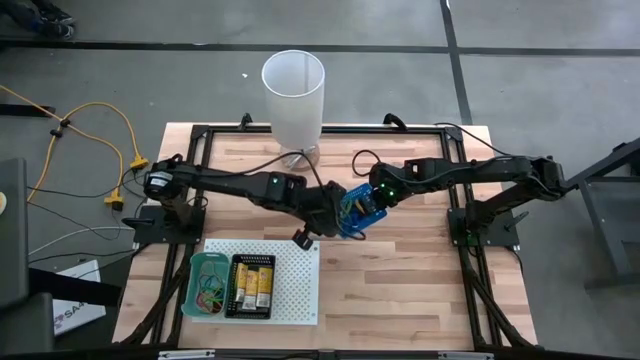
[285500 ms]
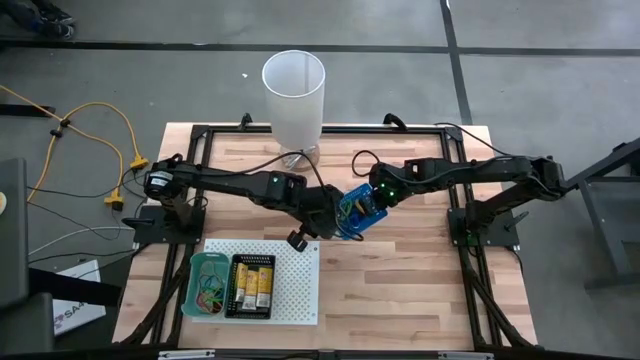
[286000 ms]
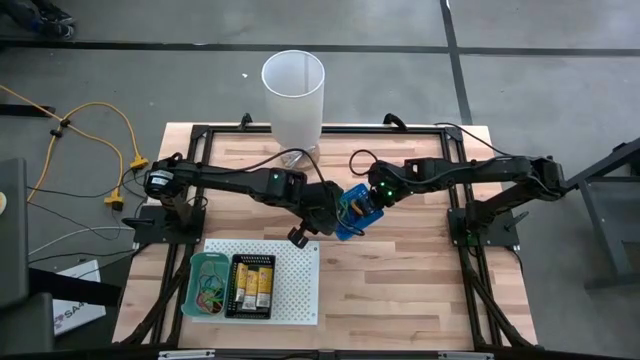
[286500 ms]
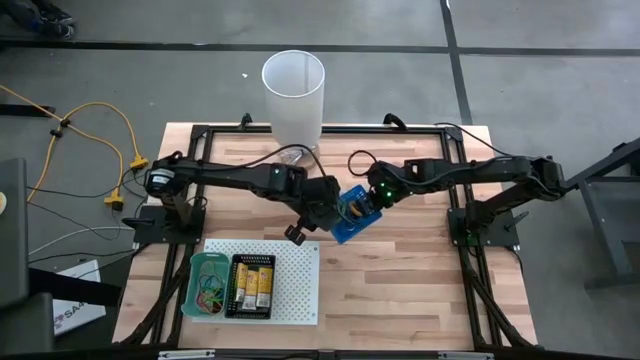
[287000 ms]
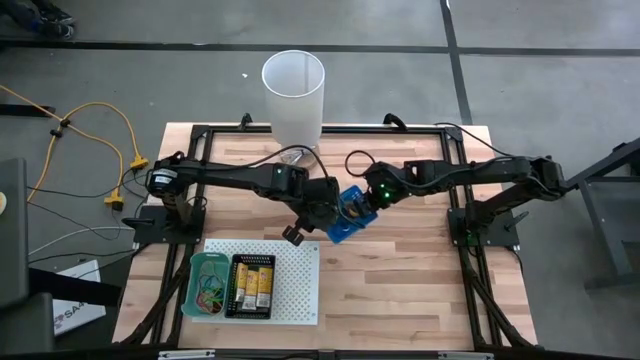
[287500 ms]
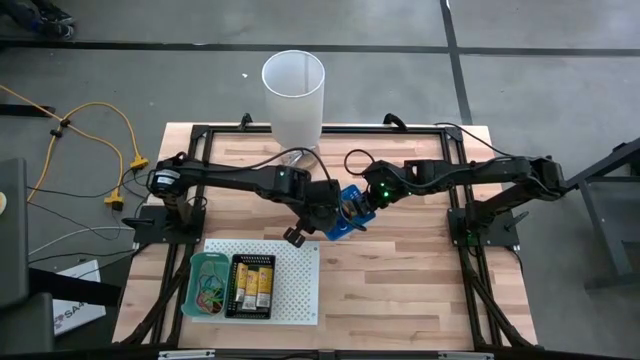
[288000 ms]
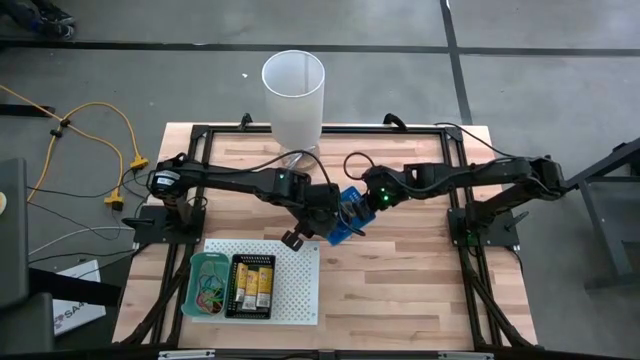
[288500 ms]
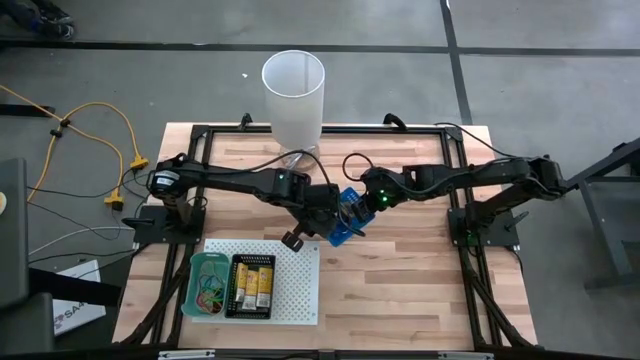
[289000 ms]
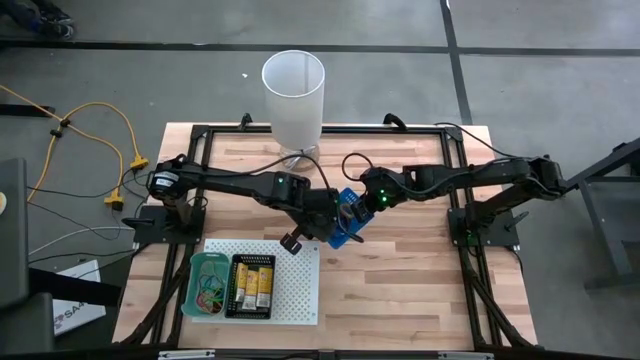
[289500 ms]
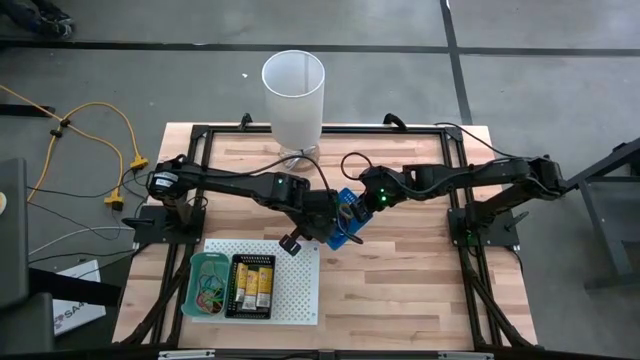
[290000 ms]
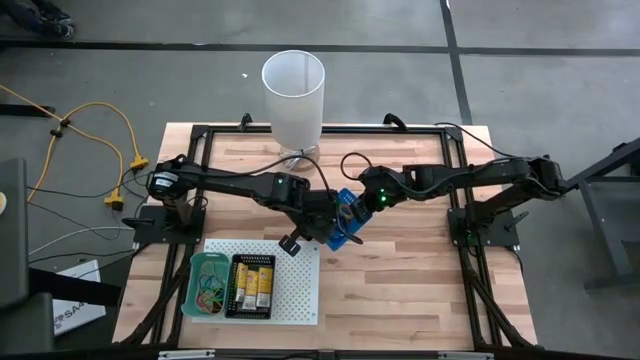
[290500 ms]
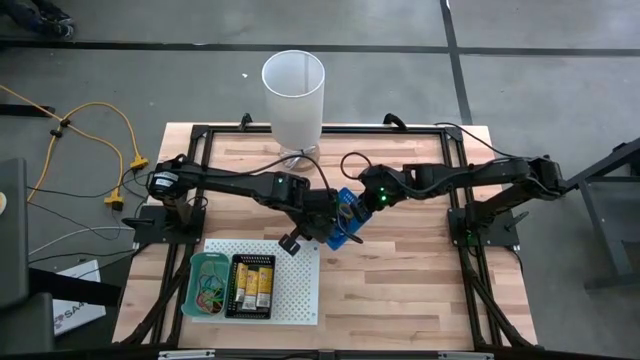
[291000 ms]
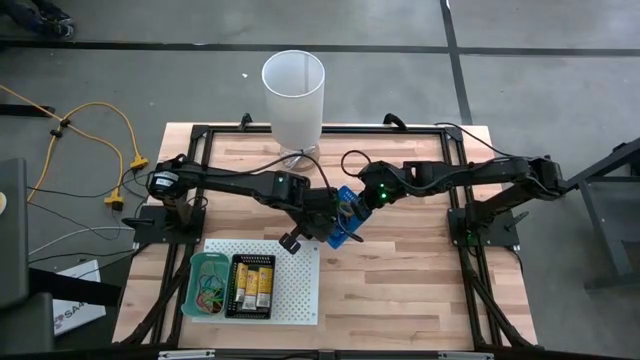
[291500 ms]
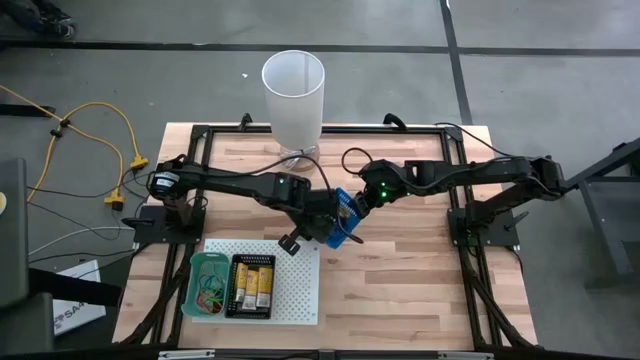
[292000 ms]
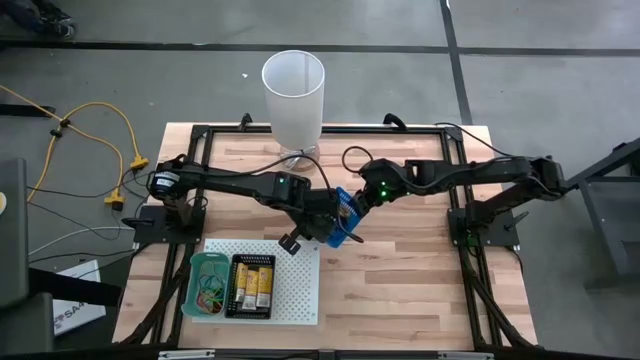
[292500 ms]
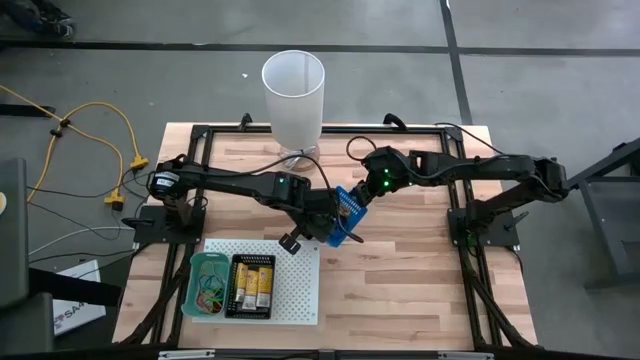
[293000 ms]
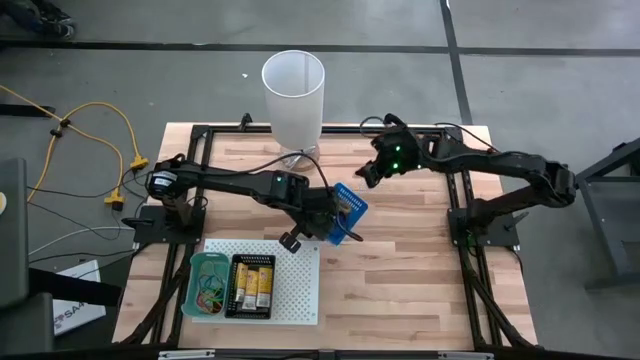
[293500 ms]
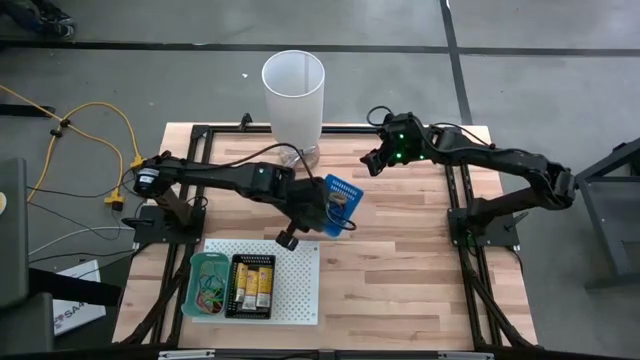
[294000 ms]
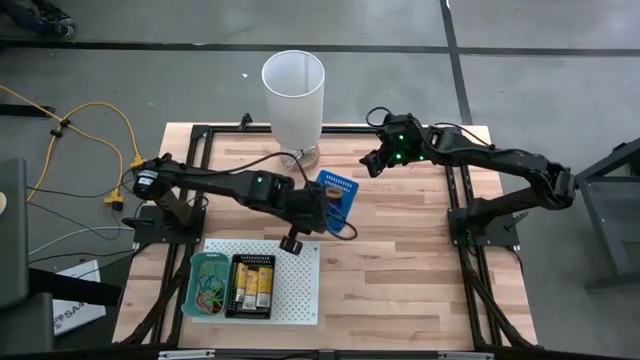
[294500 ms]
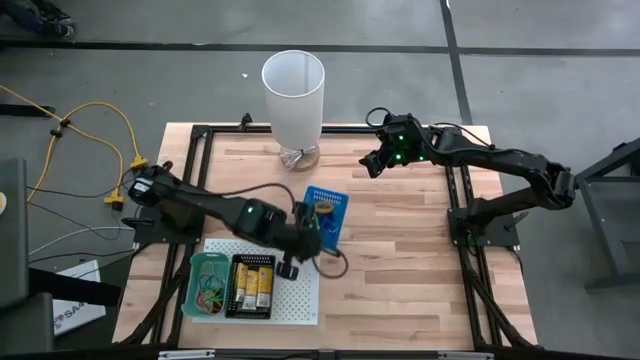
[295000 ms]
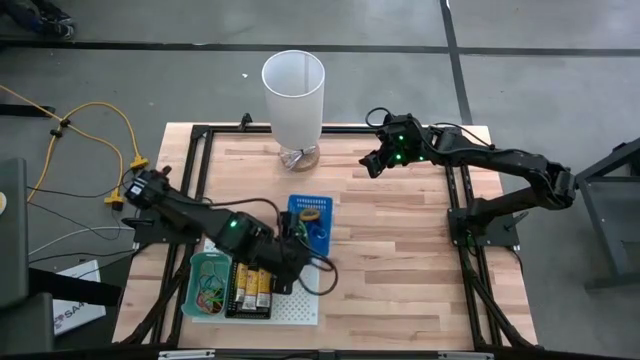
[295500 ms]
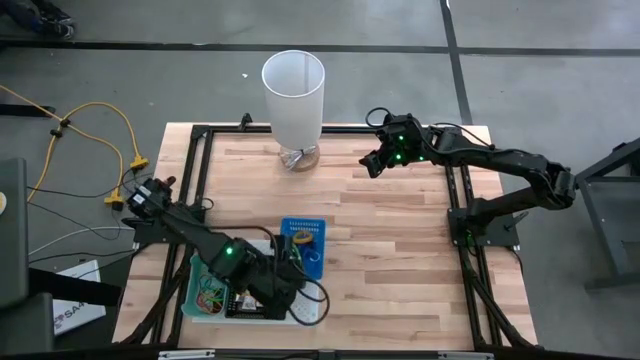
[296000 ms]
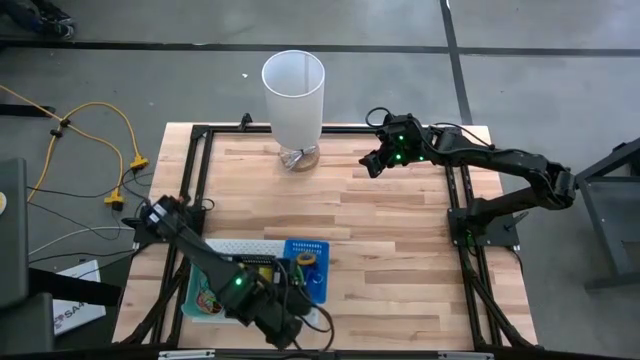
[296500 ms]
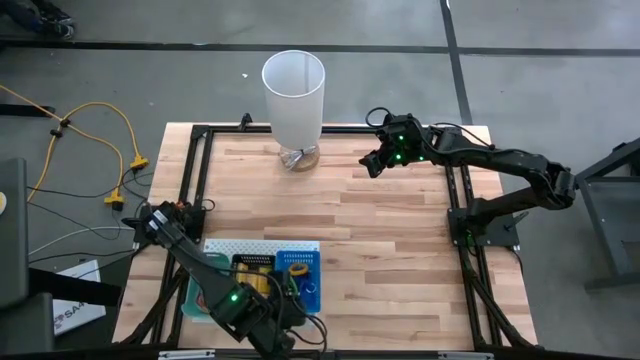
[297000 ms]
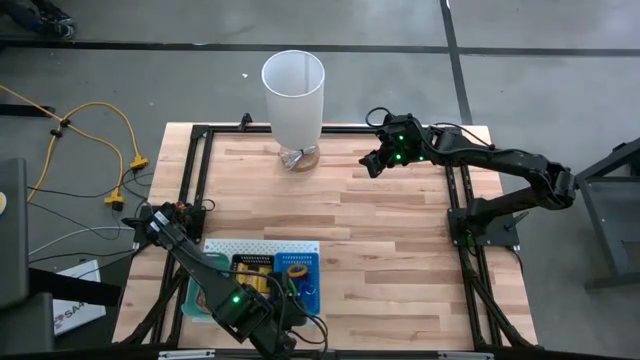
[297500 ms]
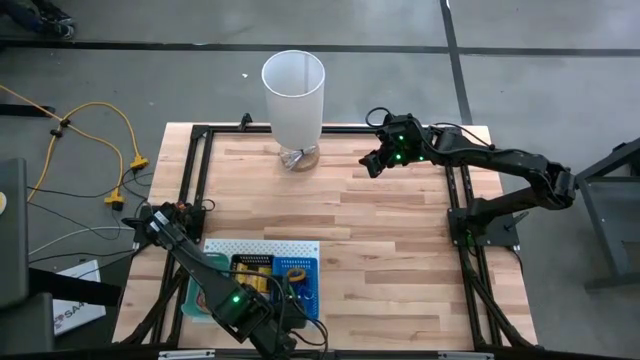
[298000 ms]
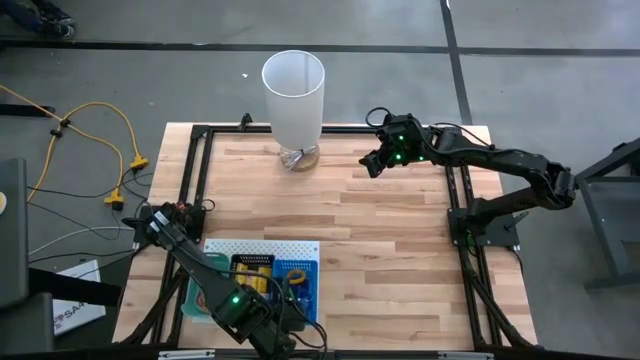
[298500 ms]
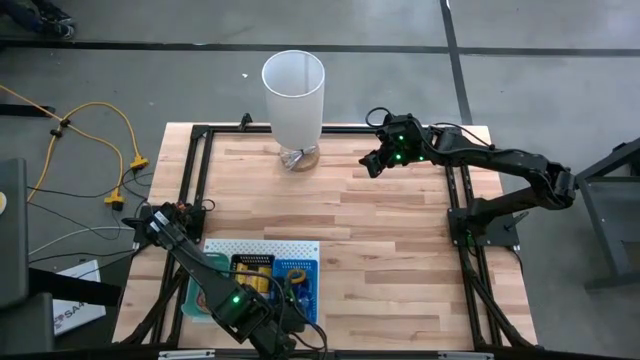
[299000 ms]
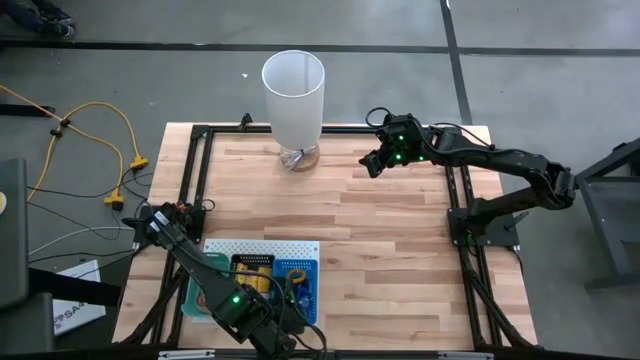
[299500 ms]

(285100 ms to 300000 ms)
Task: Pick & Place Office Desk Supplies
Put the blue bin on the shelf

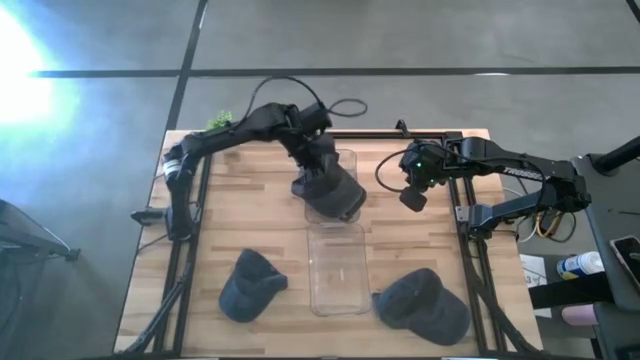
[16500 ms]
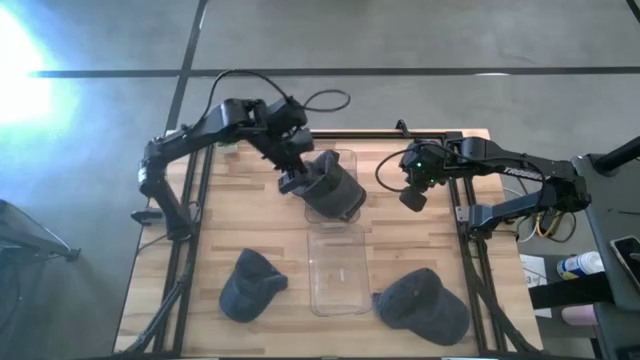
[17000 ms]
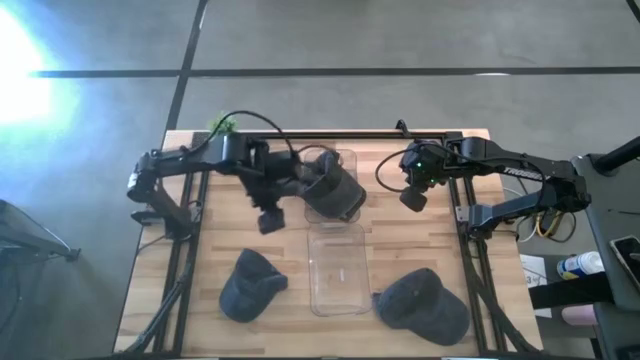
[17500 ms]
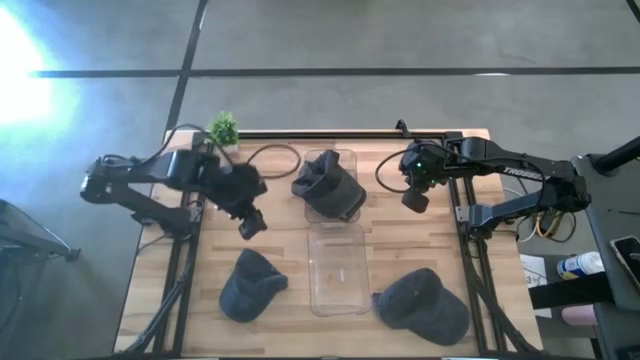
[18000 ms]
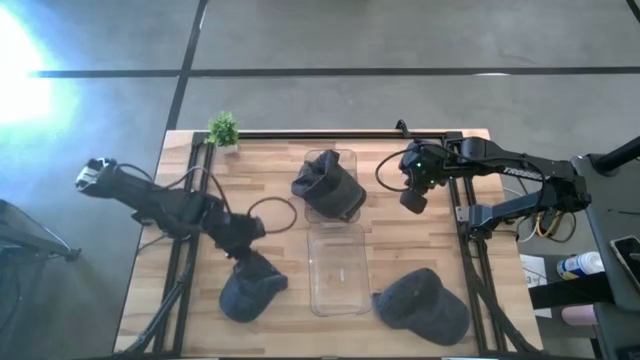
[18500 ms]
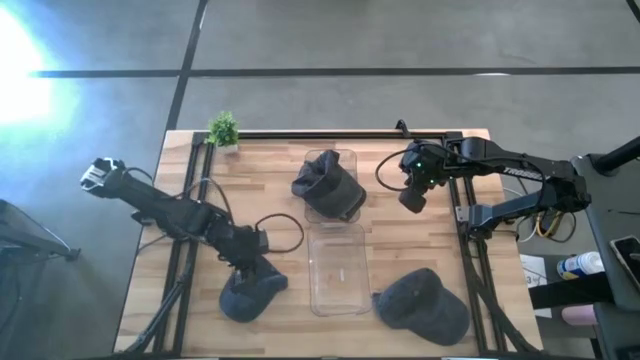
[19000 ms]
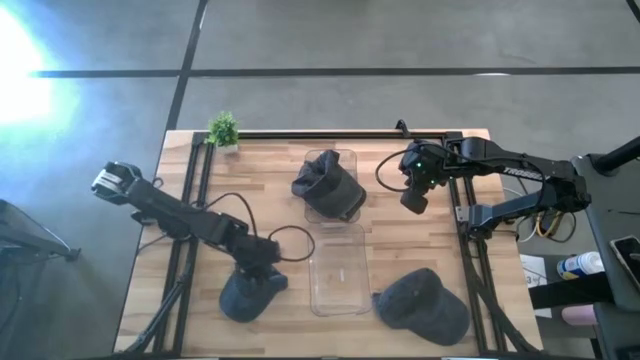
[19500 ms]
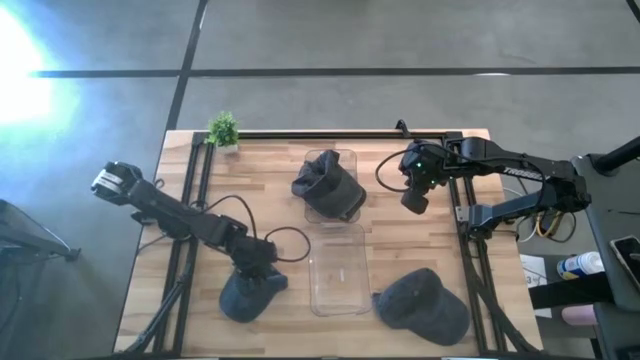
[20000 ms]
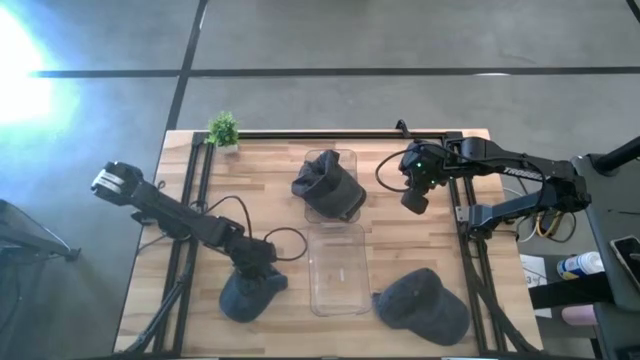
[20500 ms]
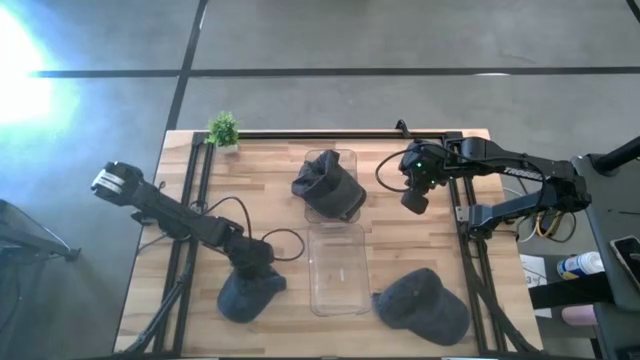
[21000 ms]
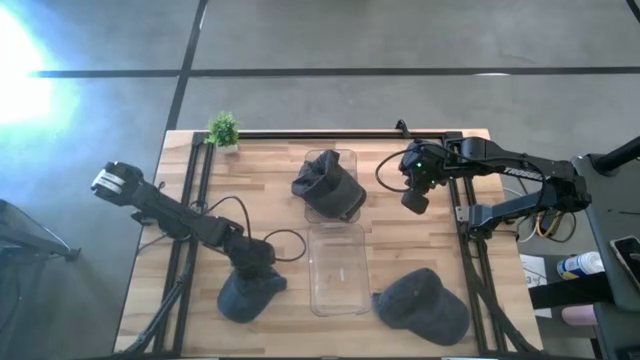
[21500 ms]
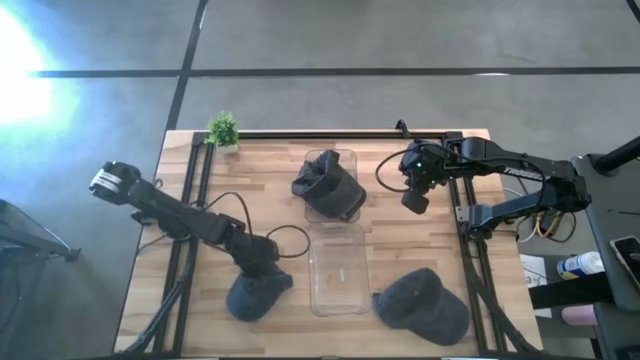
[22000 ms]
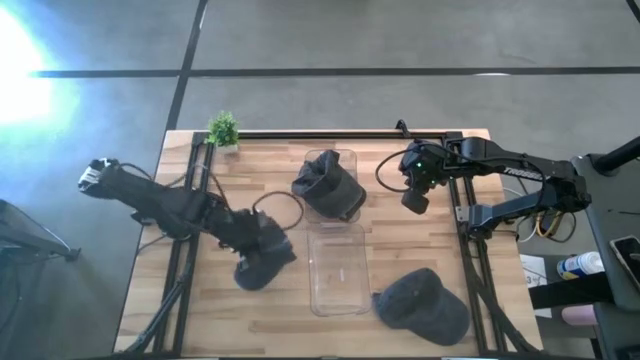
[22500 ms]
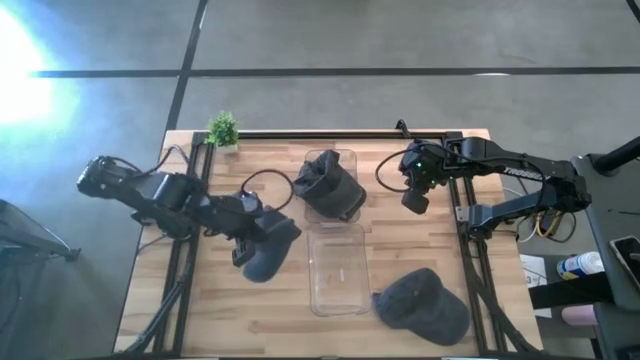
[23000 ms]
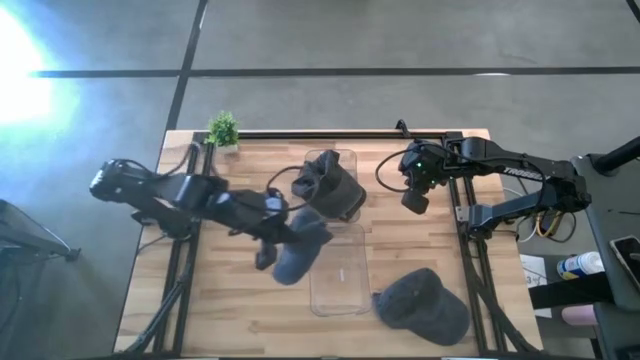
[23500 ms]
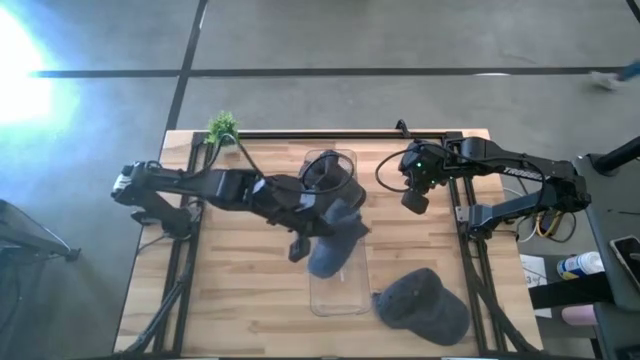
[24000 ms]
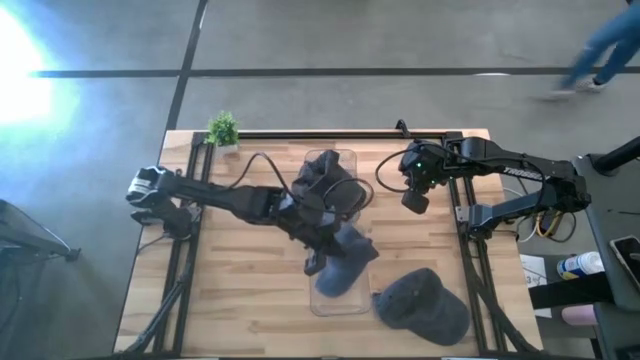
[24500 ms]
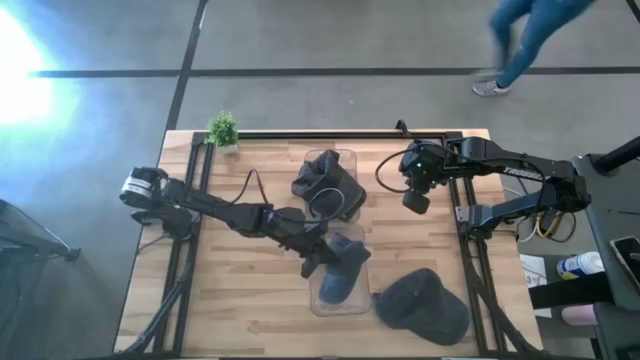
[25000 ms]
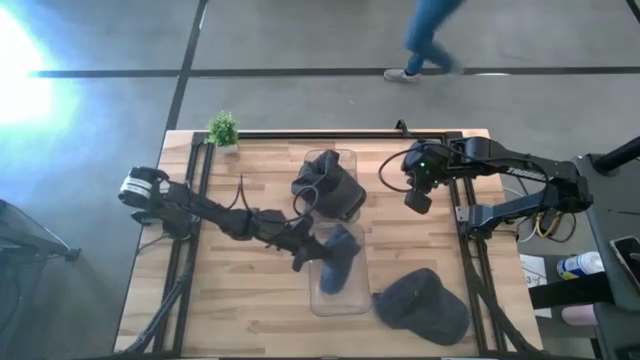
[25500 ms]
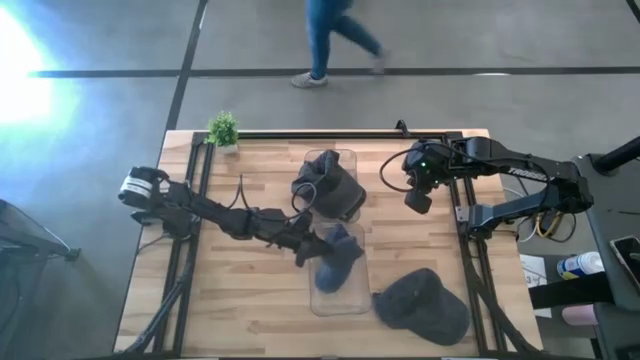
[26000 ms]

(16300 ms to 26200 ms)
Task: Pick & Place hat
Put the left blue cap into the bottom transparent bin
